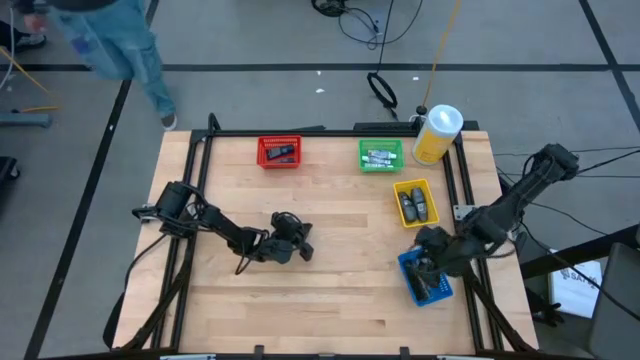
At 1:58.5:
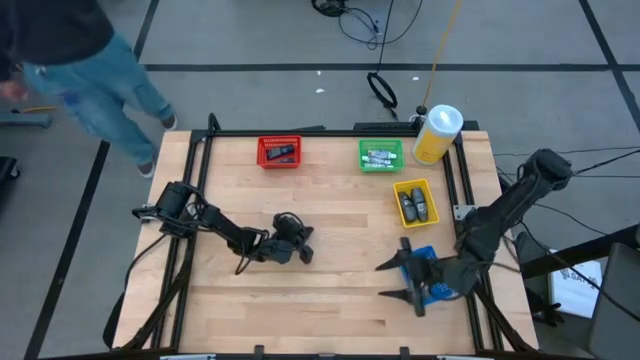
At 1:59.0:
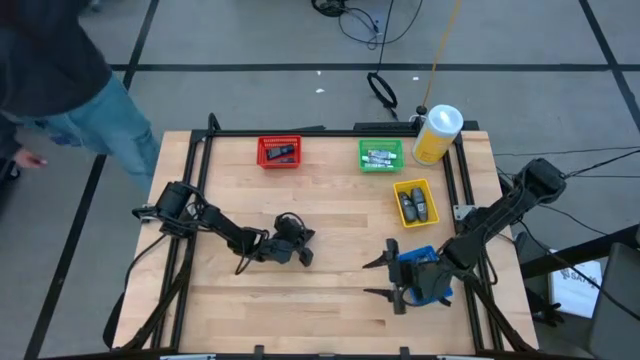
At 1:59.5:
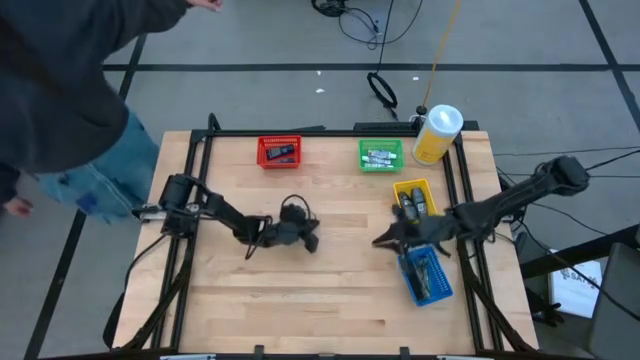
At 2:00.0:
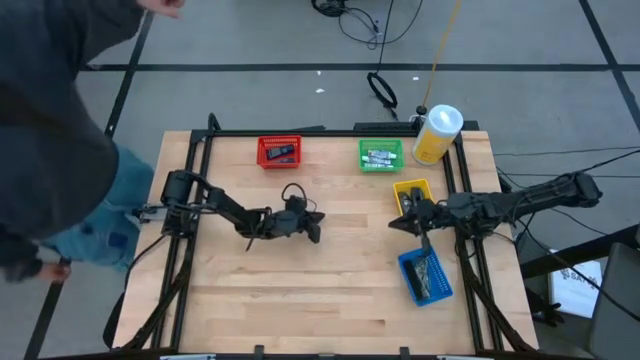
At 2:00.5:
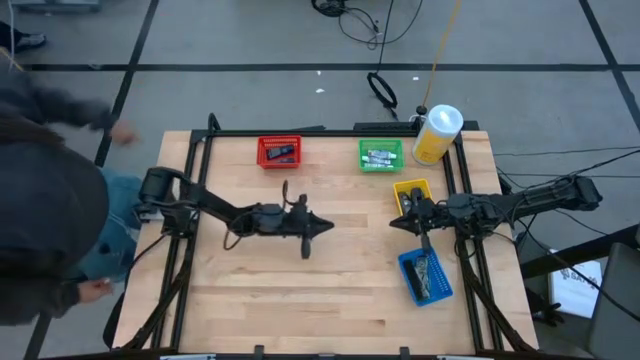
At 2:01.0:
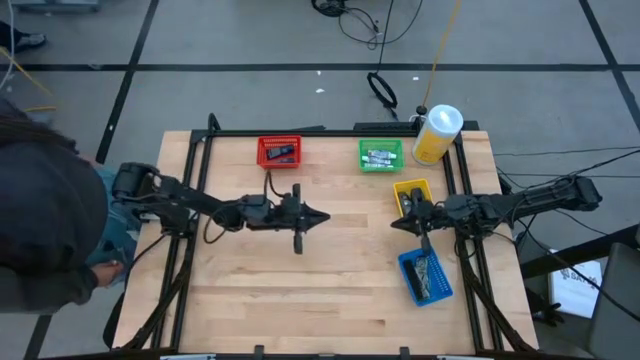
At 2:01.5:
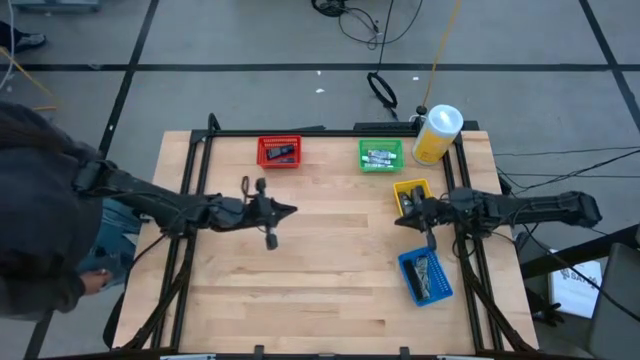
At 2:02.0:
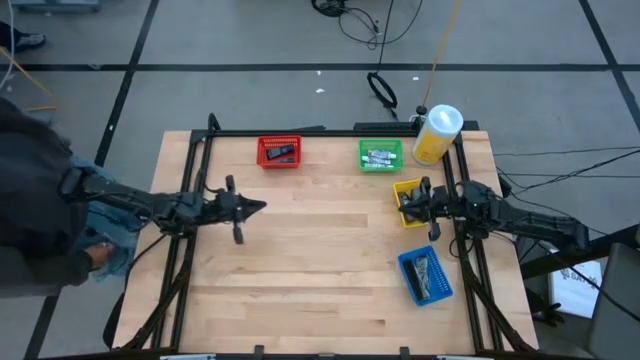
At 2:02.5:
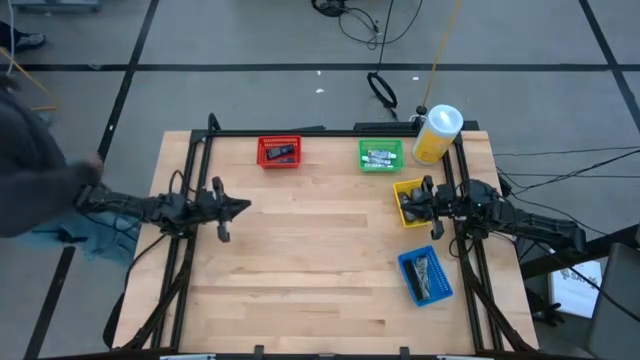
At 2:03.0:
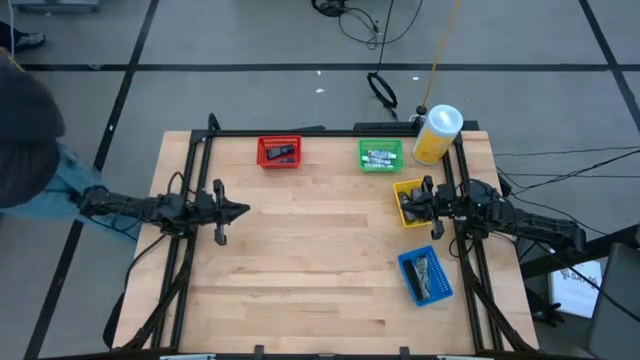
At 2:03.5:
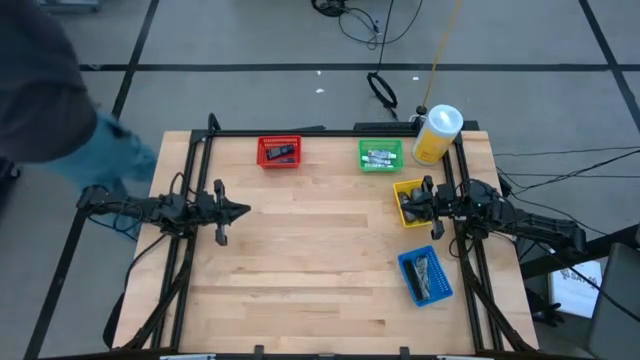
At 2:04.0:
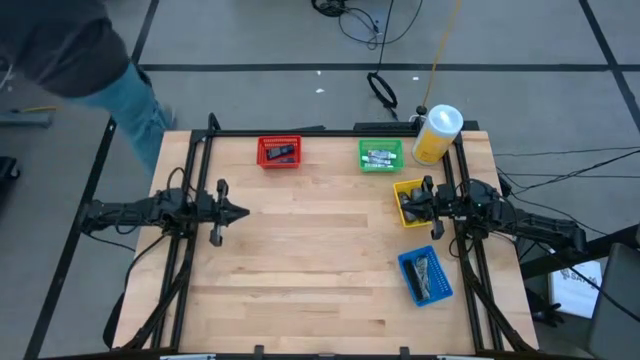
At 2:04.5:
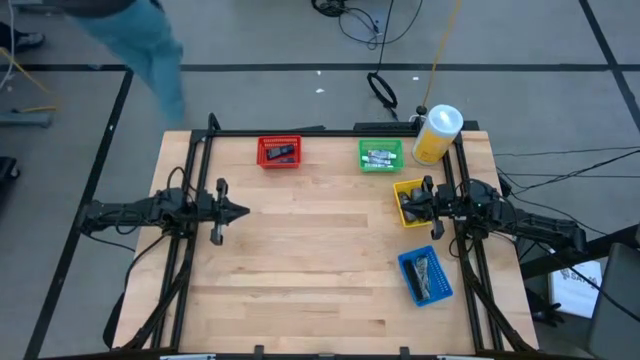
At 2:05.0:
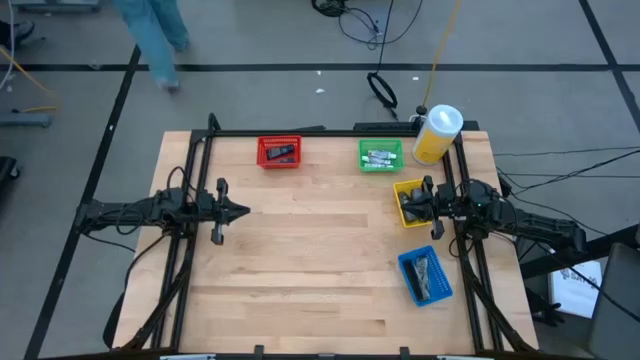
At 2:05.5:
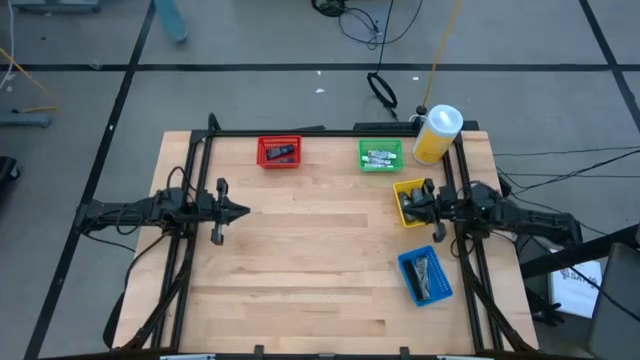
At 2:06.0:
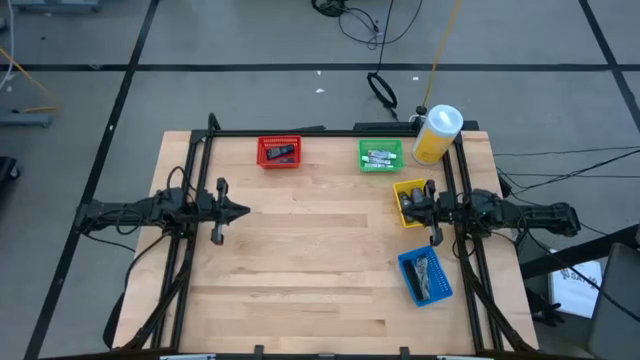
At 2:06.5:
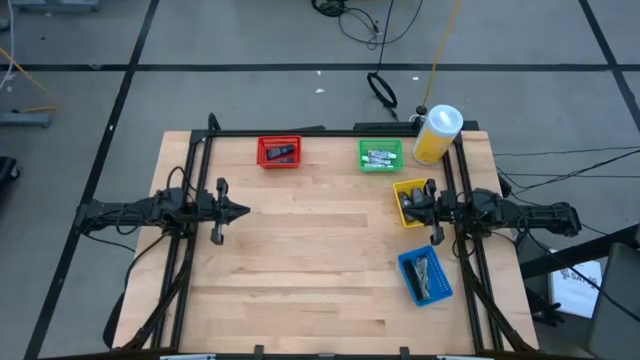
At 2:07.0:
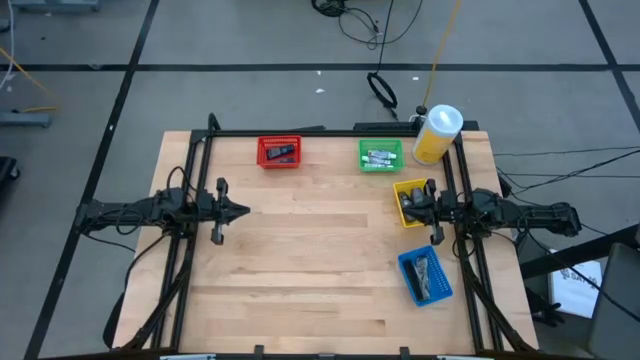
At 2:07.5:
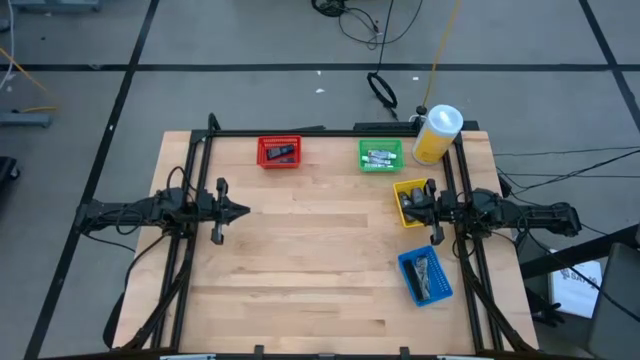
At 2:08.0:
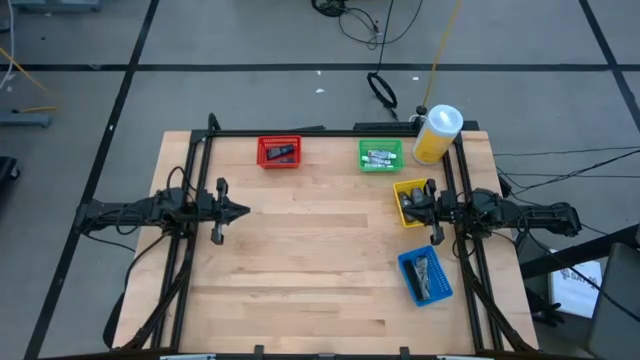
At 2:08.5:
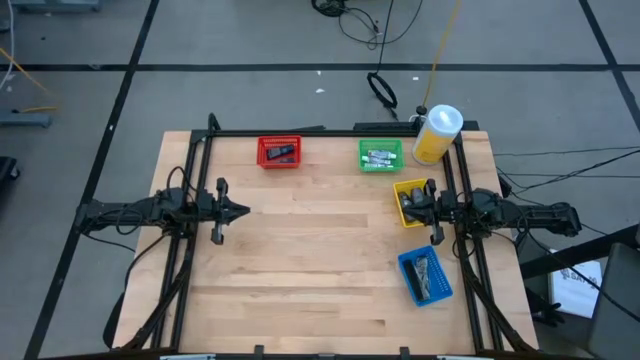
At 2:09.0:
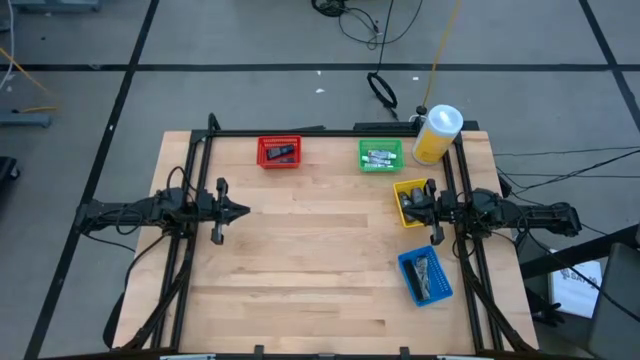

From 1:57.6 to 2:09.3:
Task: Pick & Place Travel size toiletries
Return to Home Position

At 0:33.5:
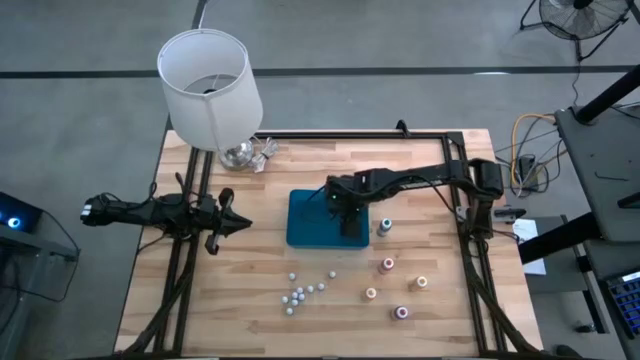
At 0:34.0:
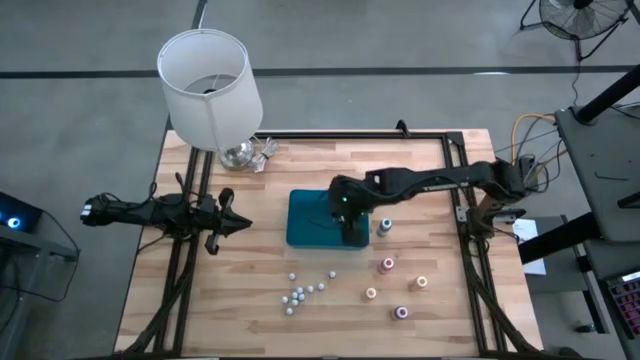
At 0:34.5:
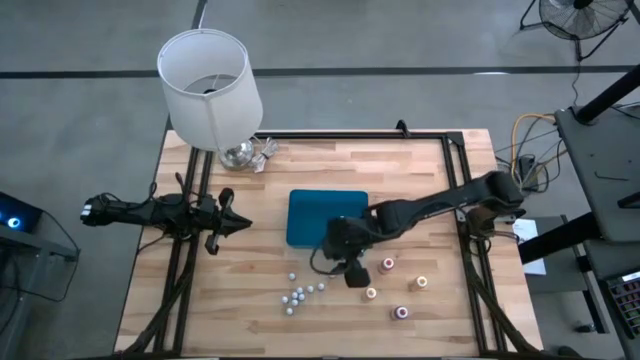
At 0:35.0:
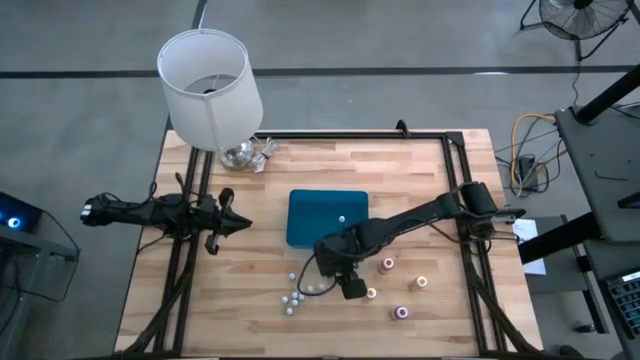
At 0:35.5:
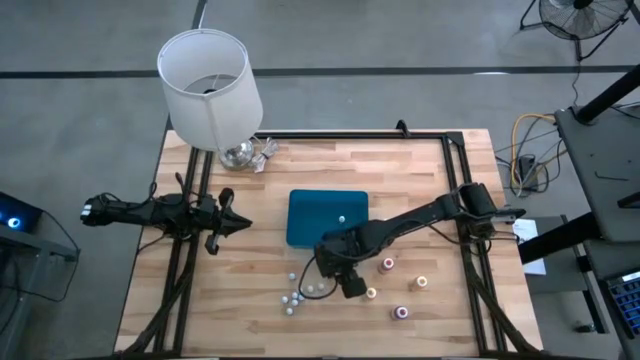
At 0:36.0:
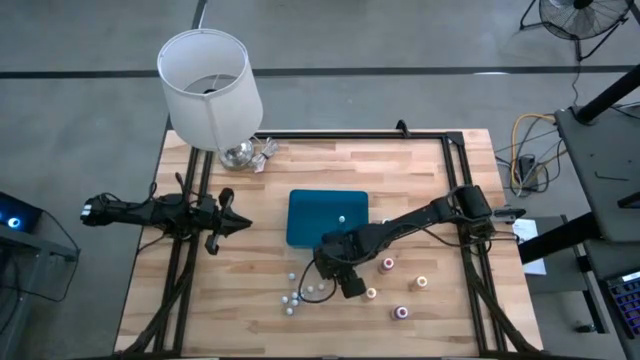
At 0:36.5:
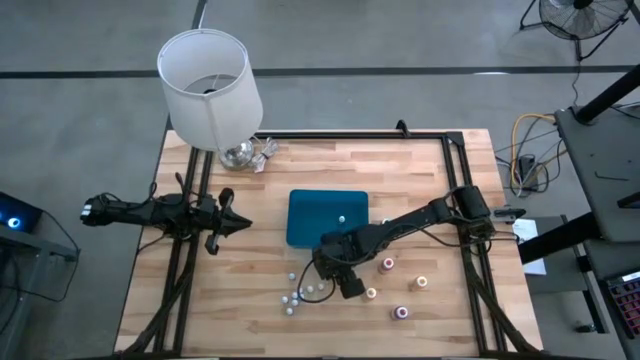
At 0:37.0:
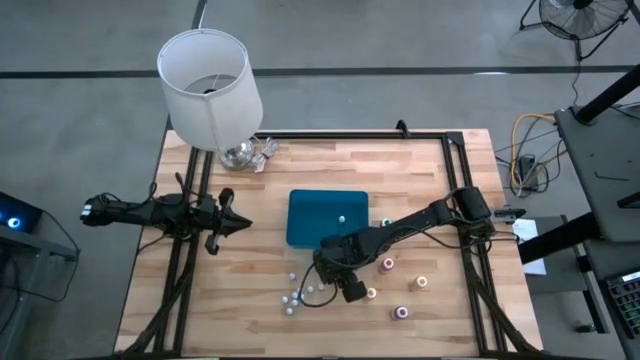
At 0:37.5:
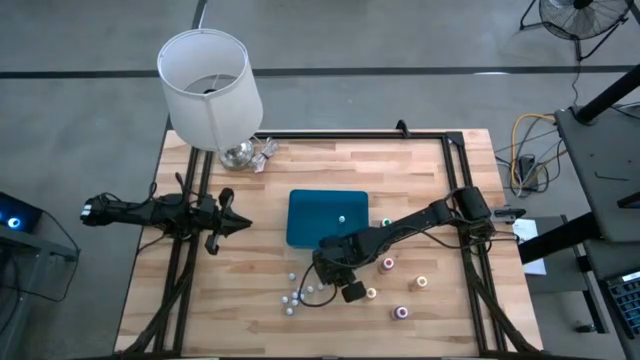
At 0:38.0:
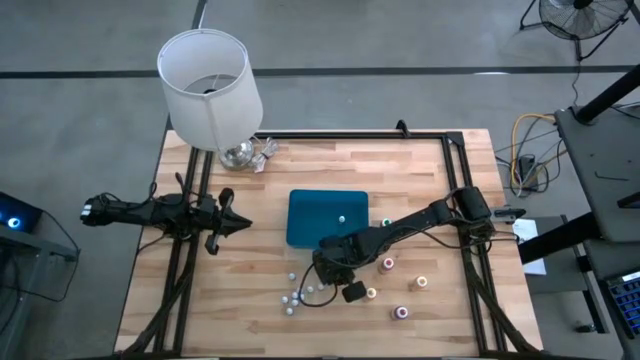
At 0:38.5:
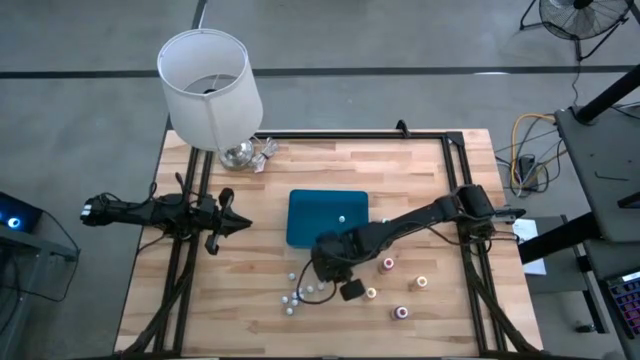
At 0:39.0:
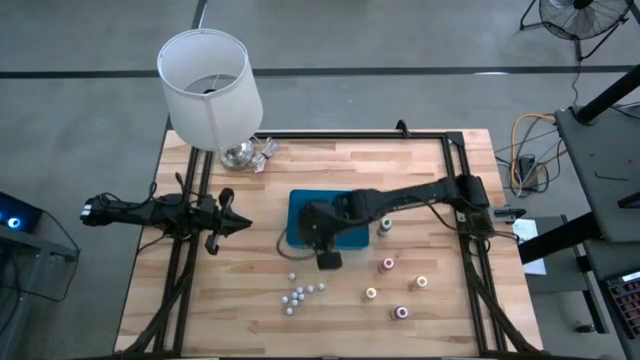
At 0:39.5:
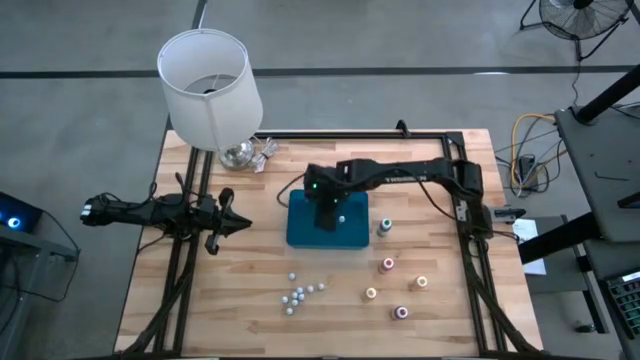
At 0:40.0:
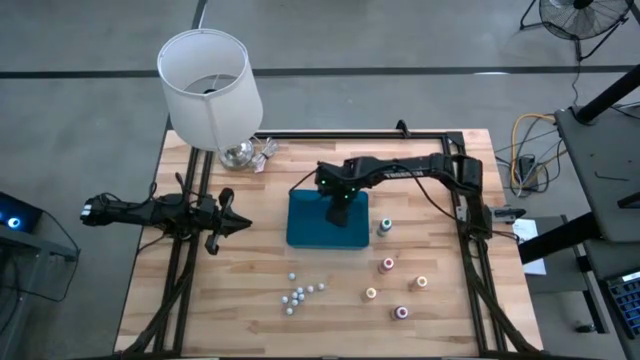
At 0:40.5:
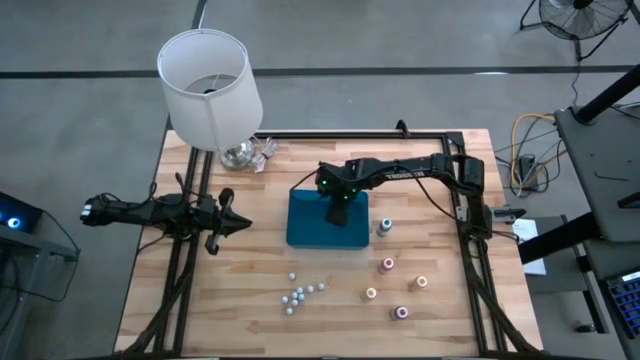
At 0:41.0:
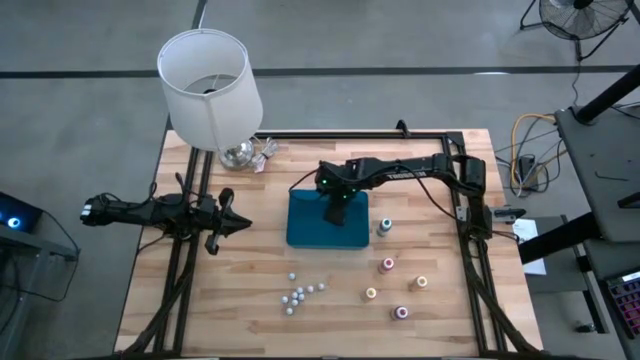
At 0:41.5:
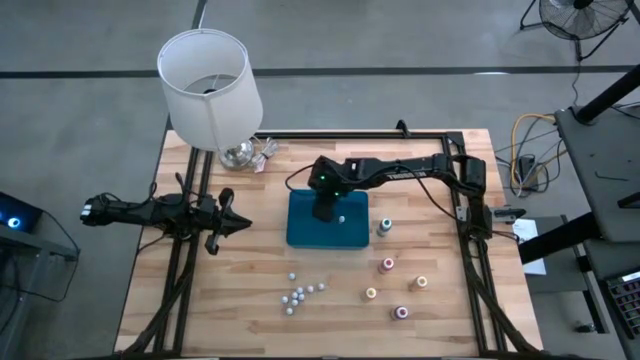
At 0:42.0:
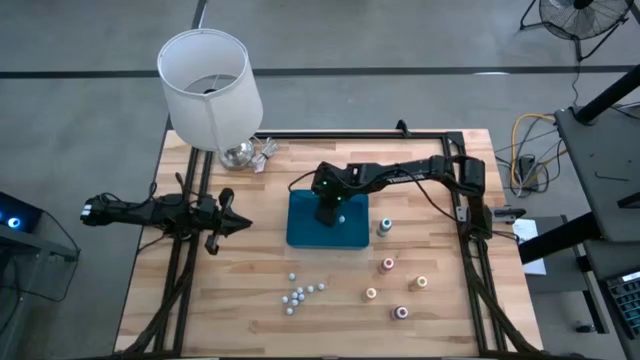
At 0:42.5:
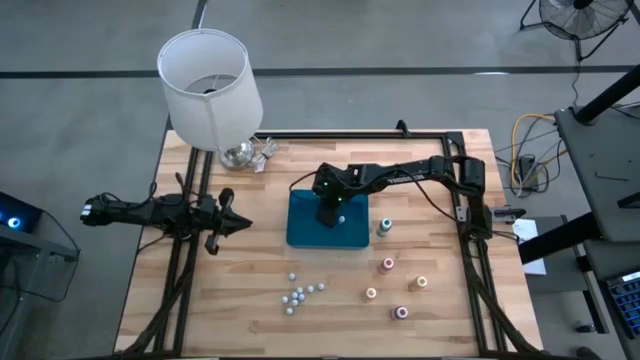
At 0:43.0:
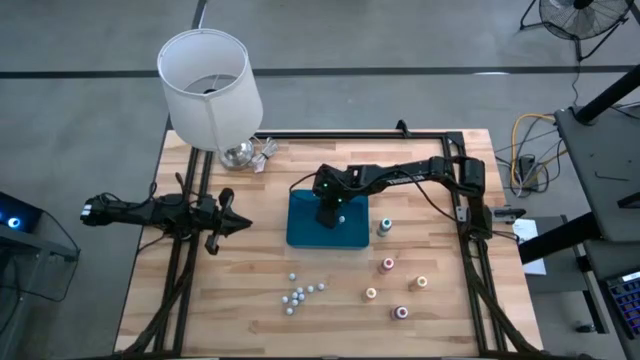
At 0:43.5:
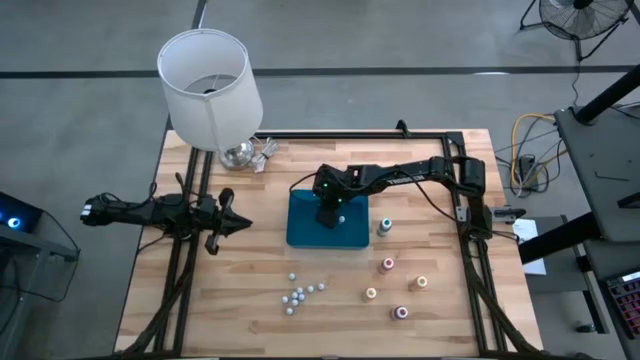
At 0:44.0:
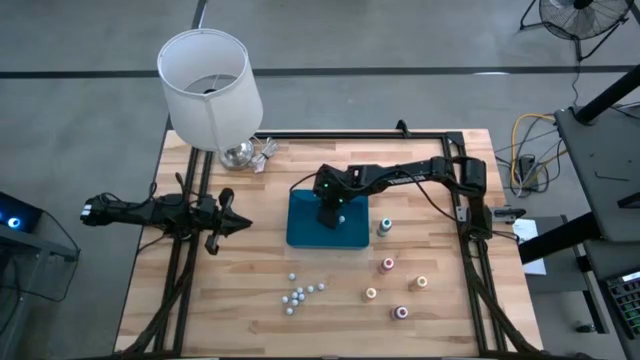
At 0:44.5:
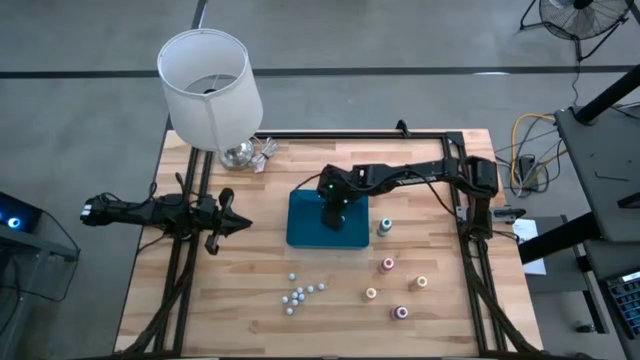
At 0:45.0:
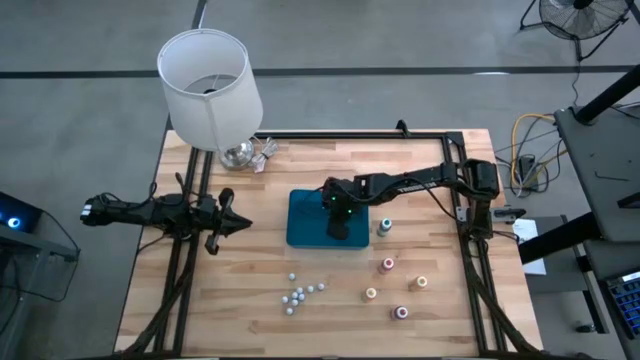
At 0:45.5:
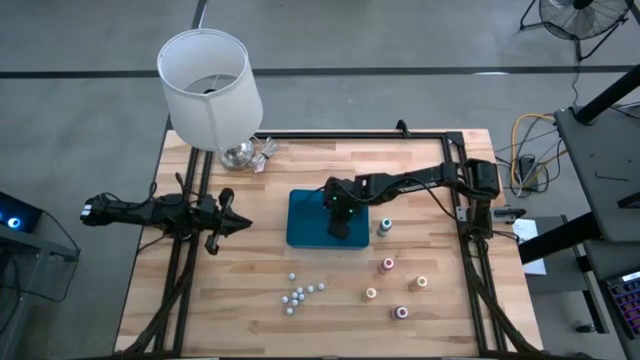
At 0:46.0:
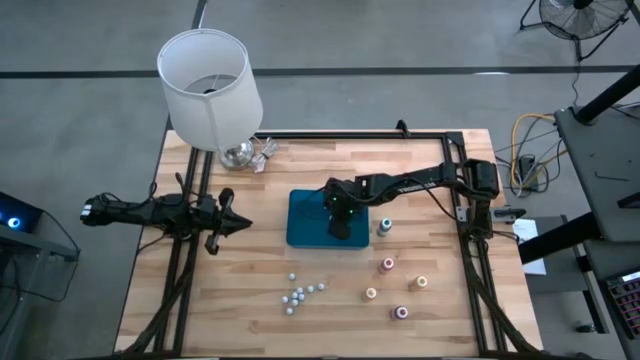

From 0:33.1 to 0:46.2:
Task: Pick & Place food coloring
Put the top right small green food coloring bottle into the blue bin
